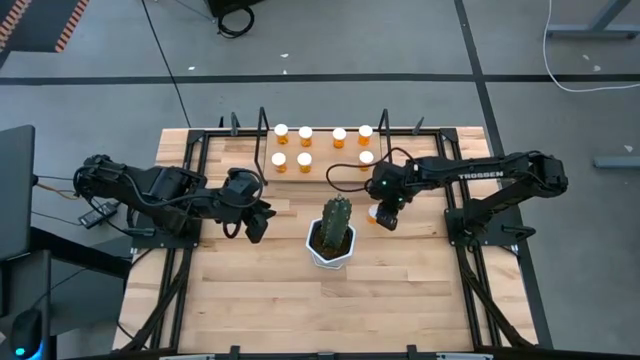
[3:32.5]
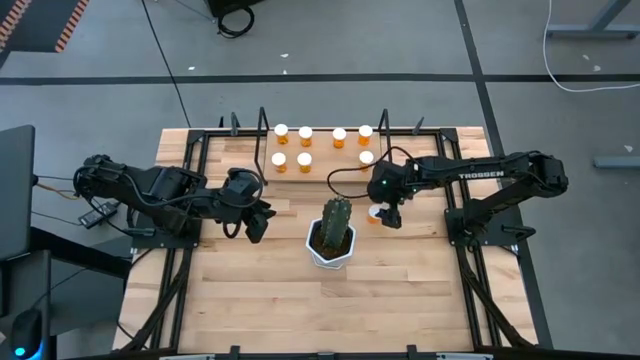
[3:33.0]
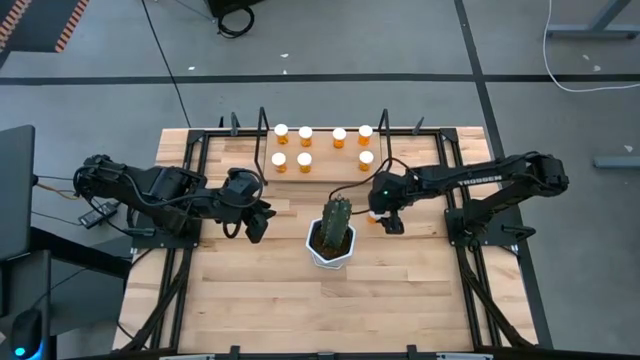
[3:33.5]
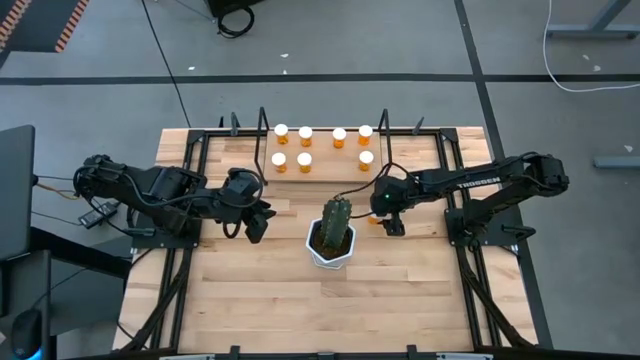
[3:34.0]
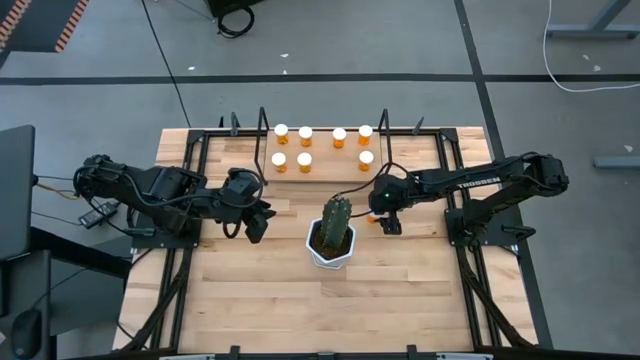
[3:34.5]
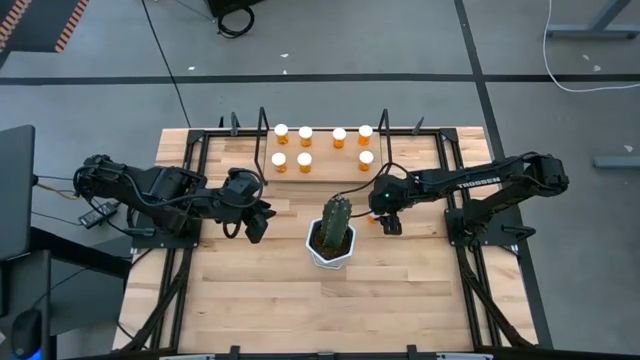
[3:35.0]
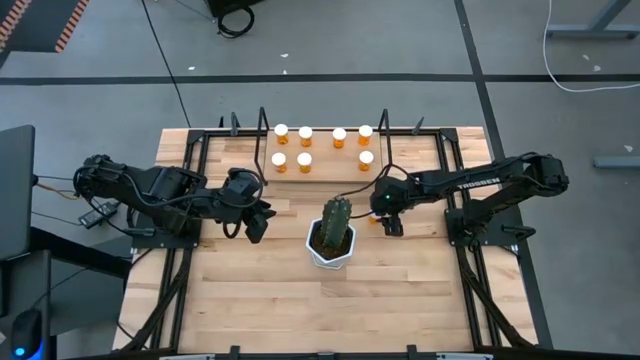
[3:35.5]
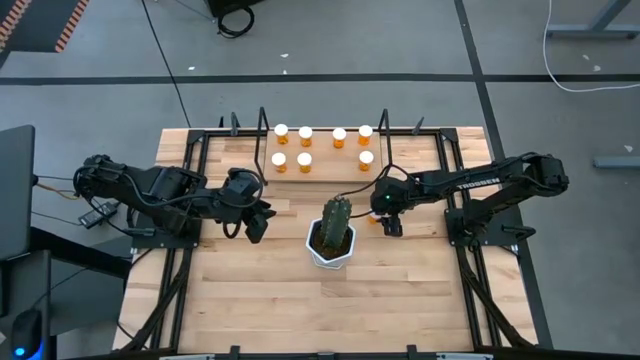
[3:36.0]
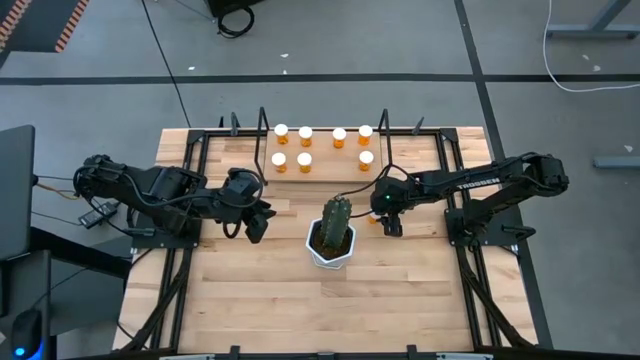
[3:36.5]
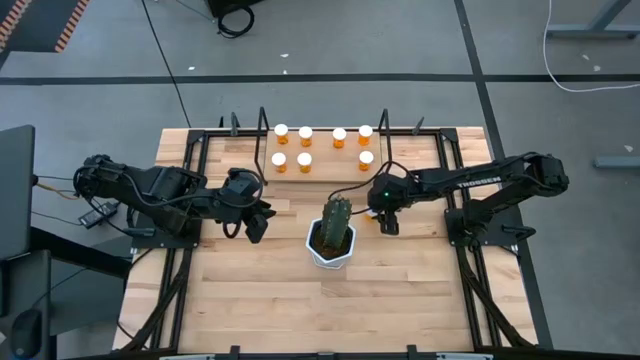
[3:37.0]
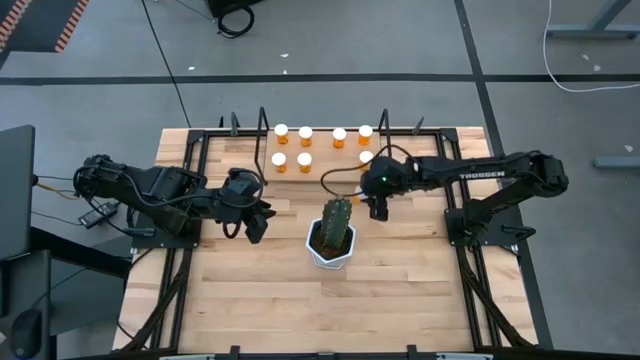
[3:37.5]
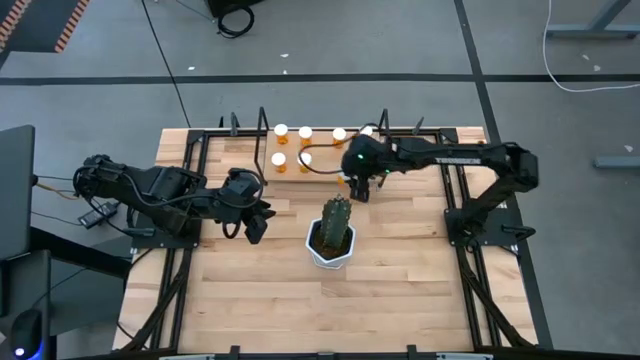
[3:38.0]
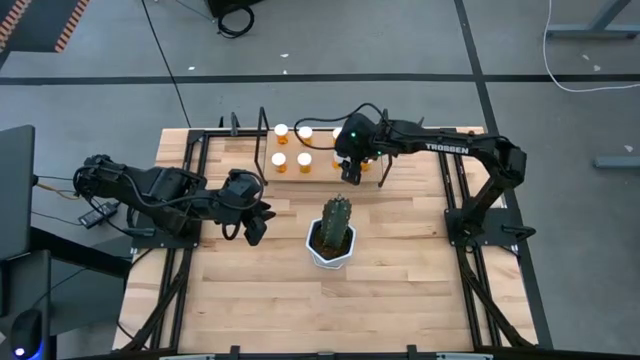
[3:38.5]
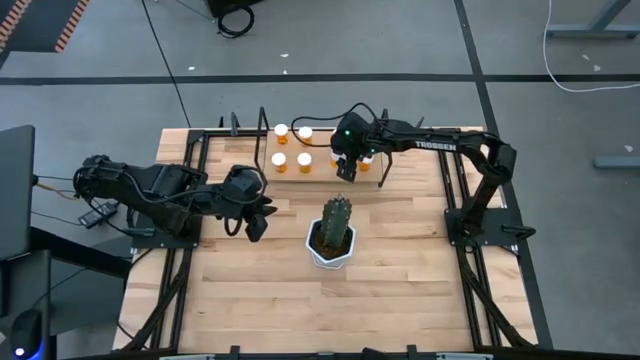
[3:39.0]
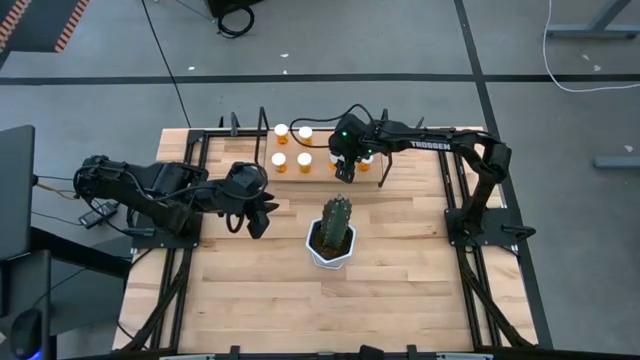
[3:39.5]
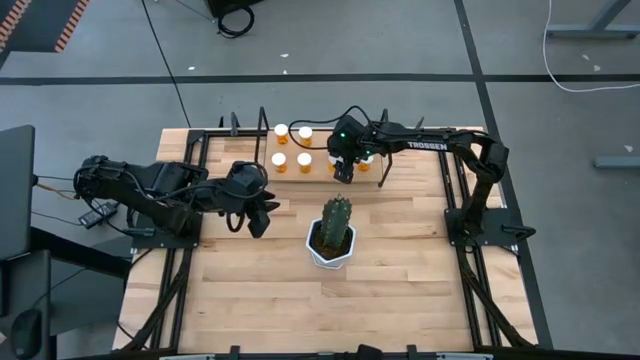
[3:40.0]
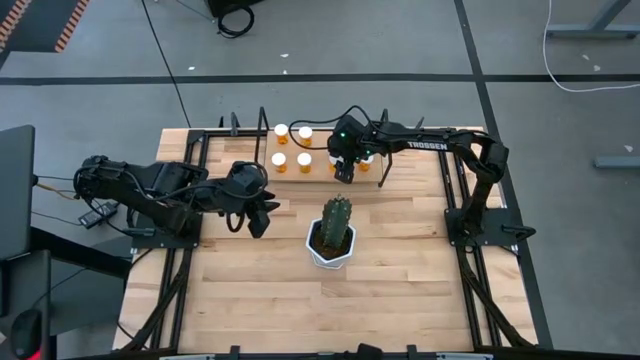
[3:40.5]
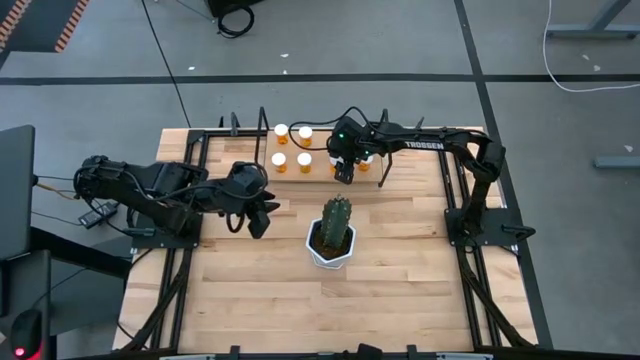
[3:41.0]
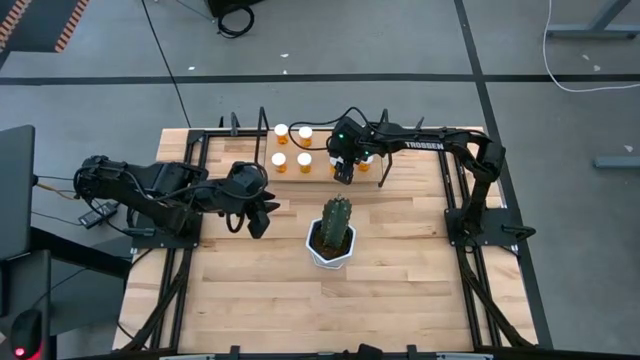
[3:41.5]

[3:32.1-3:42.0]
Task: Pick and place medicine bottles onto shelf by color
Put the orange medicine bottle on the shelf

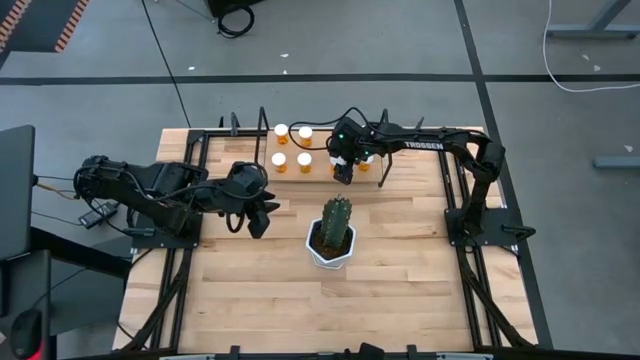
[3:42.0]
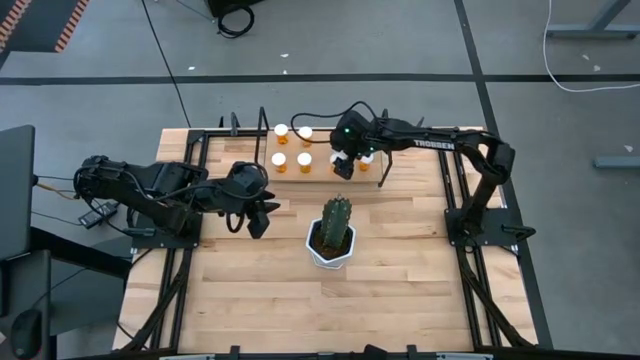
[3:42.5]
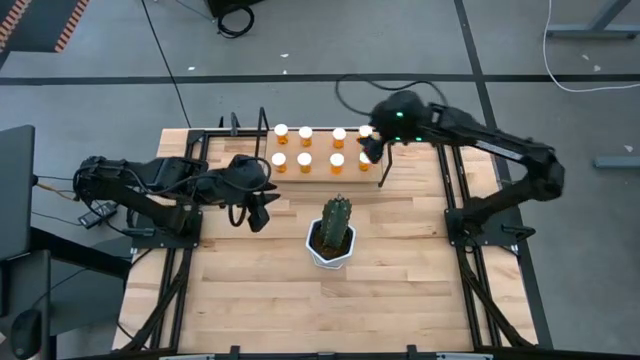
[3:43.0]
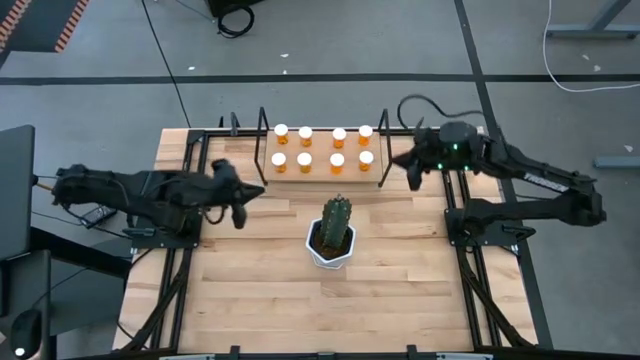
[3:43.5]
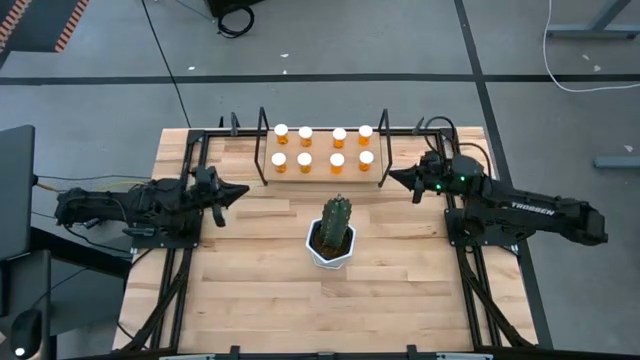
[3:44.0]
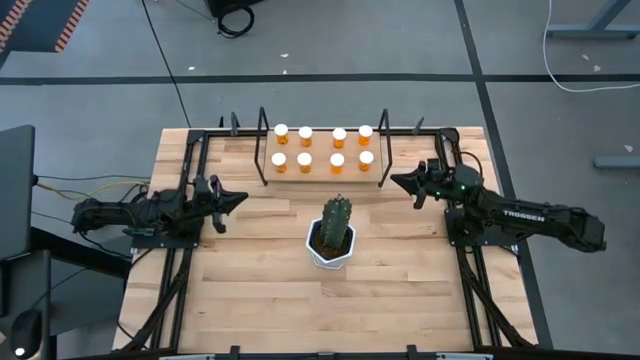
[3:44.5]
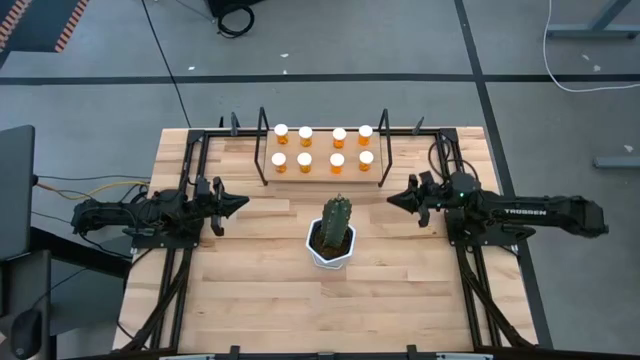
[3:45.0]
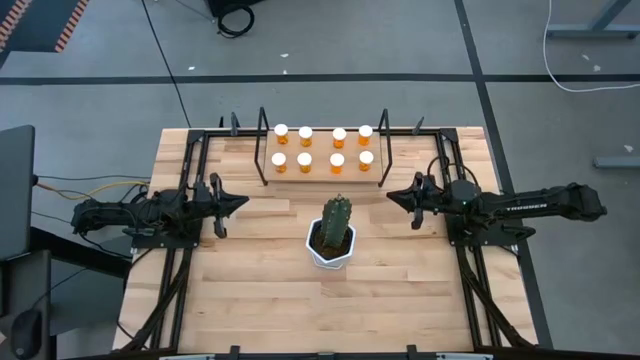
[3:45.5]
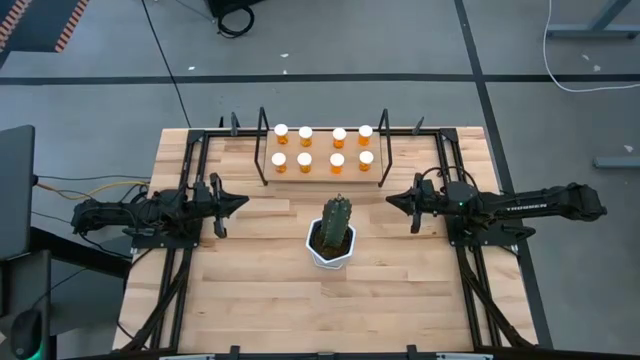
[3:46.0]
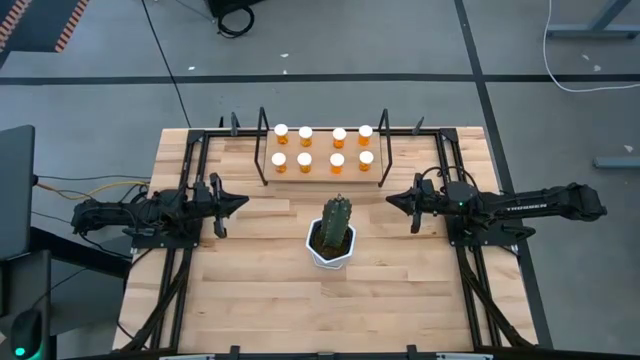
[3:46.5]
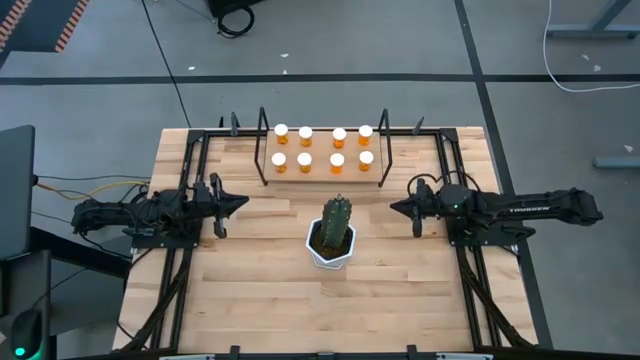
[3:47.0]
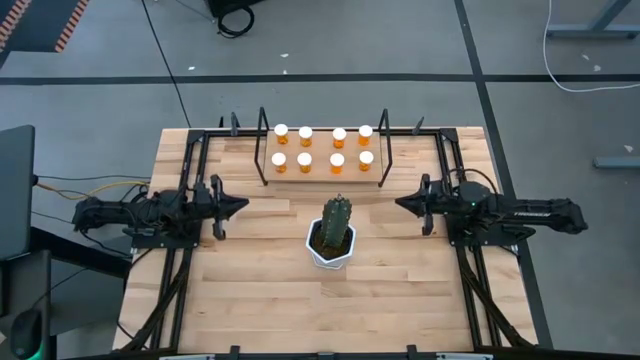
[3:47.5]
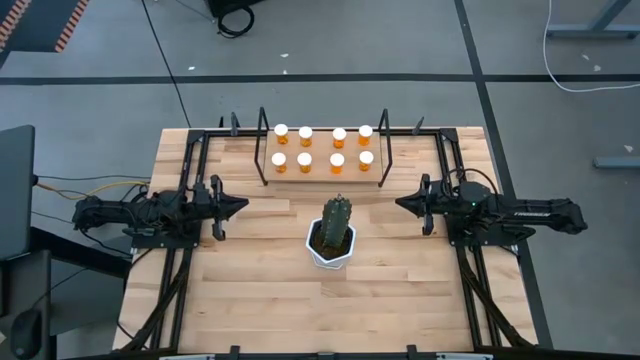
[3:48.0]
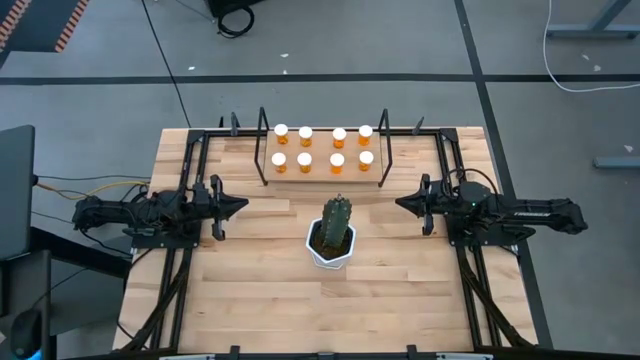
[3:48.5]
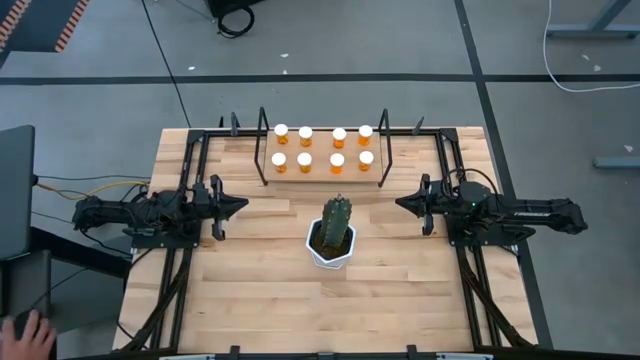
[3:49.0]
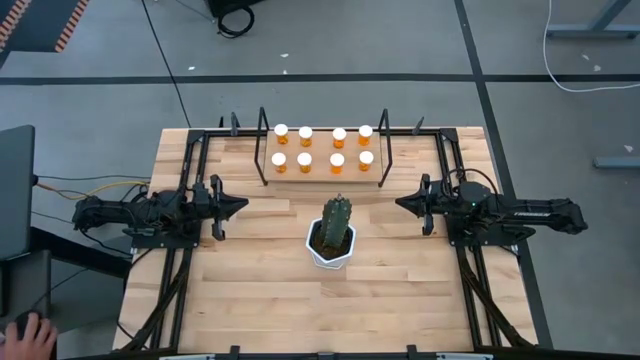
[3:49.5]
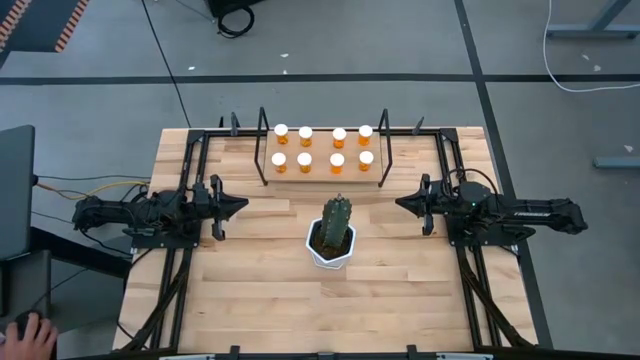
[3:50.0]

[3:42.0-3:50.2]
Return to Home Position

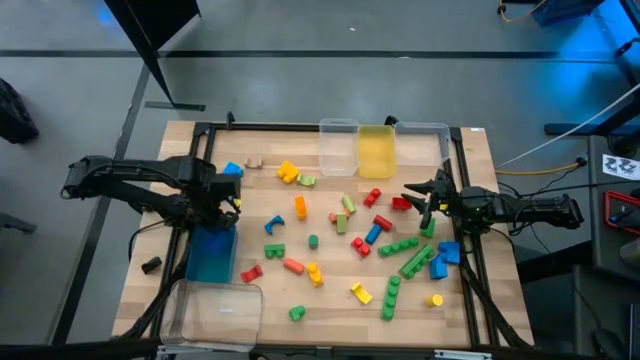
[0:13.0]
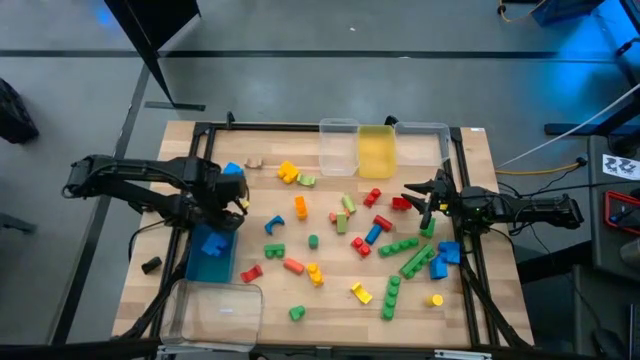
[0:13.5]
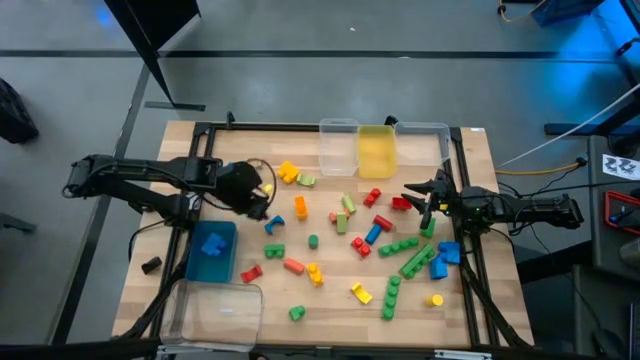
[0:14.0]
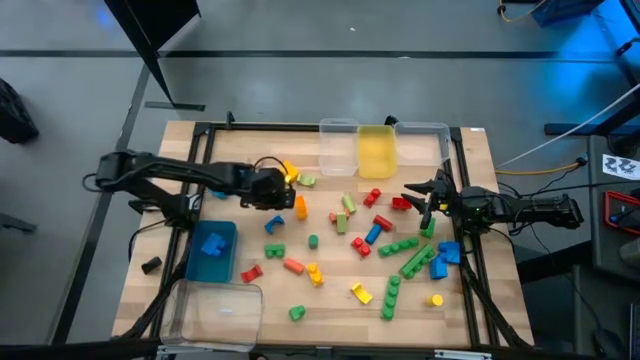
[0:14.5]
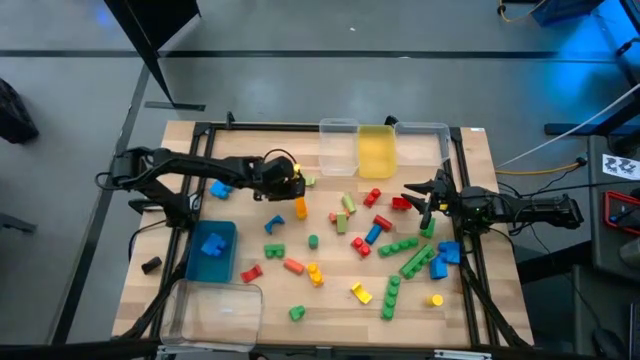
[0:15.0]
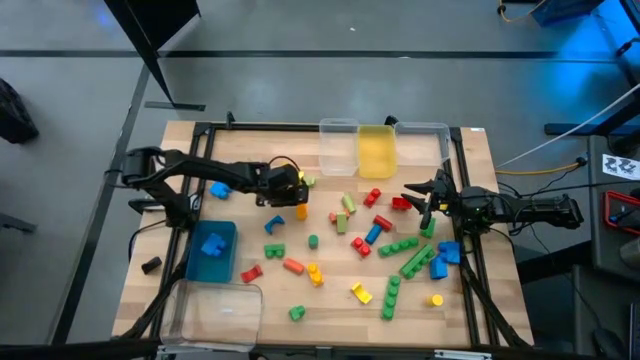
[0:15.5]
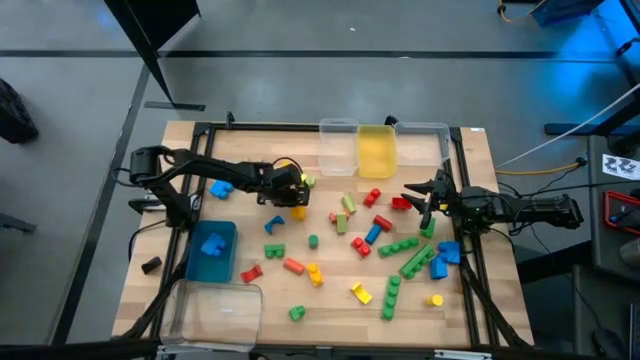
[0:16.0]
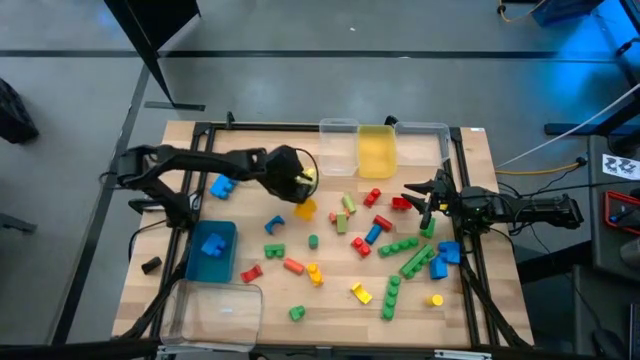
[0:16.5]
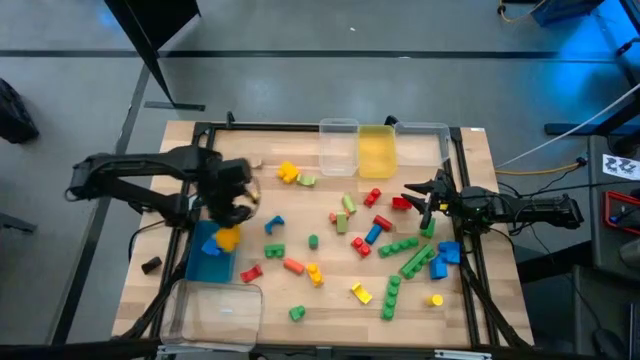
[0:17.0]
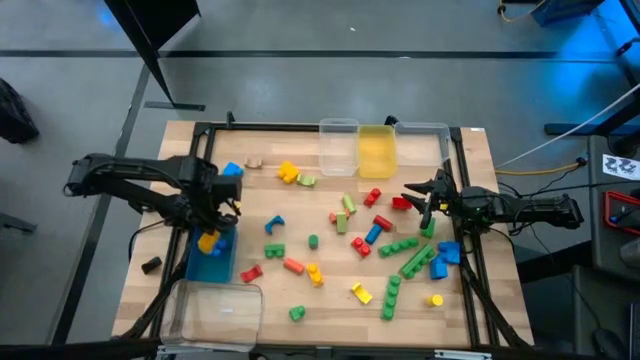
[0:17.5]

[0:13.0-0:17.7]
Task: Sort blocks by size
Put the yellow 2 stud game piece into the blue bin

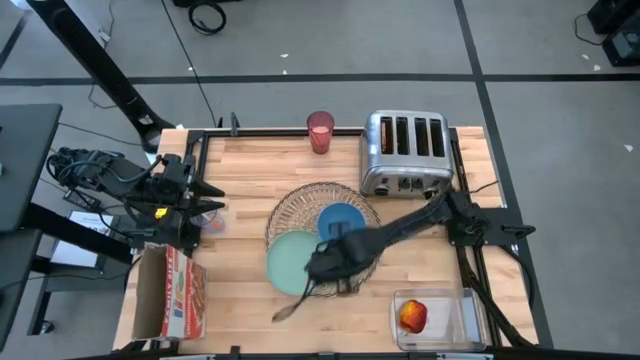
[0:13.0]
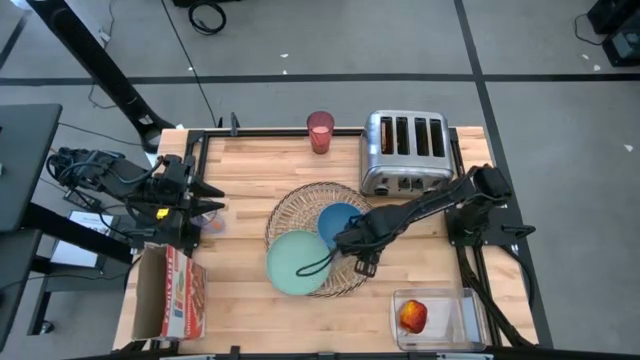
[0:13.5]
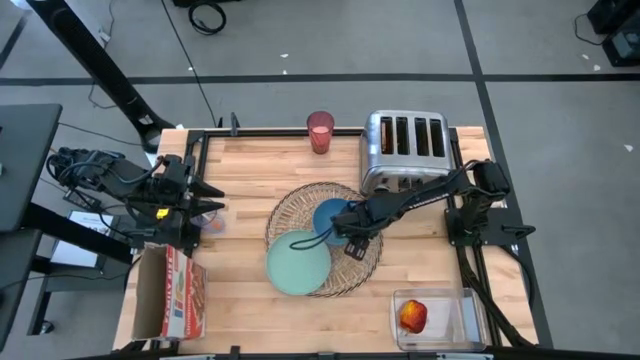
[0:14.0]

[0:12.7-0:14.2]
Task: Arrange a breakfast setting
Adjust the blue bowl
